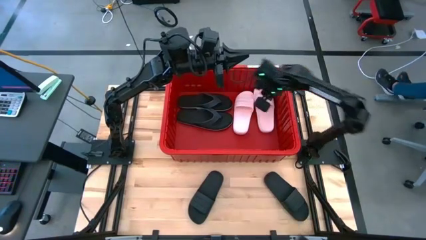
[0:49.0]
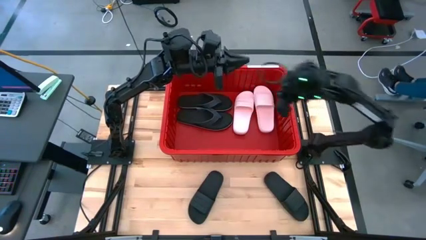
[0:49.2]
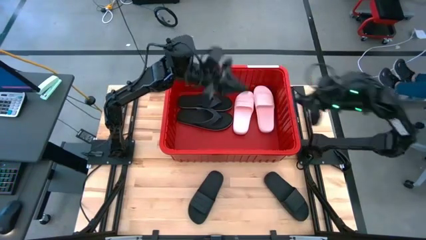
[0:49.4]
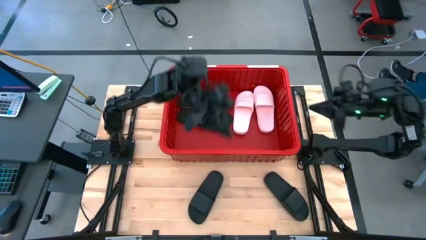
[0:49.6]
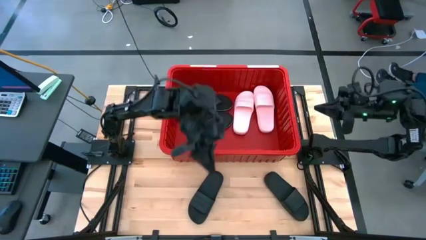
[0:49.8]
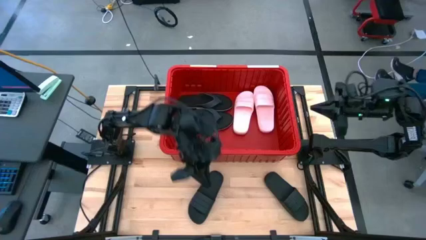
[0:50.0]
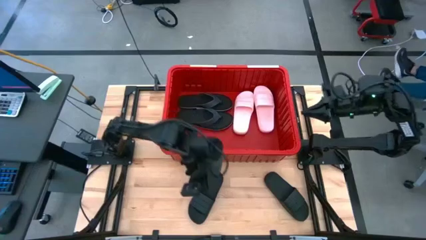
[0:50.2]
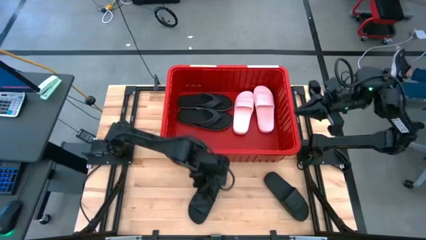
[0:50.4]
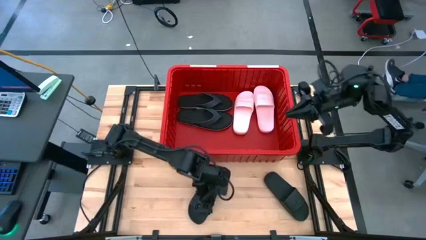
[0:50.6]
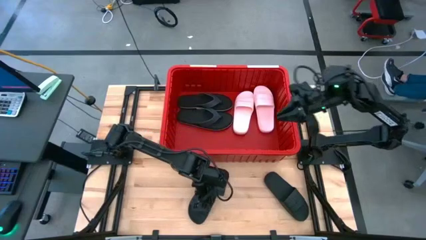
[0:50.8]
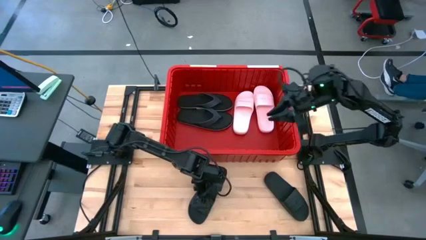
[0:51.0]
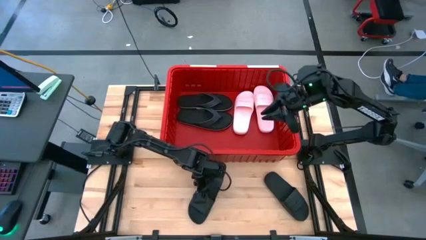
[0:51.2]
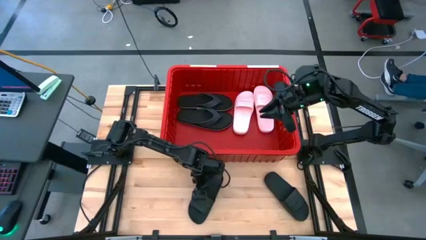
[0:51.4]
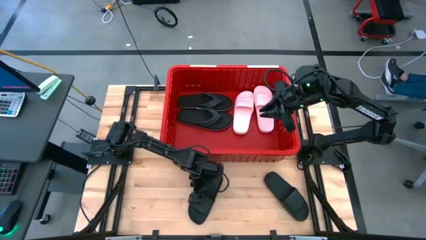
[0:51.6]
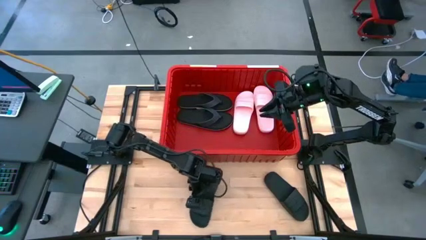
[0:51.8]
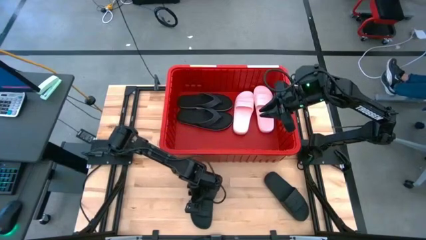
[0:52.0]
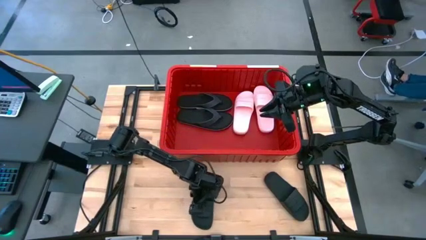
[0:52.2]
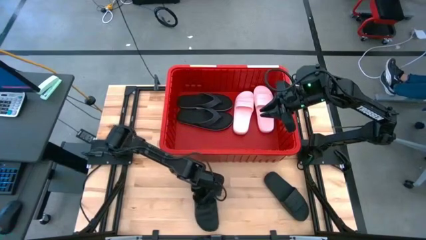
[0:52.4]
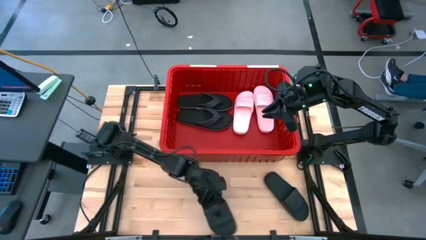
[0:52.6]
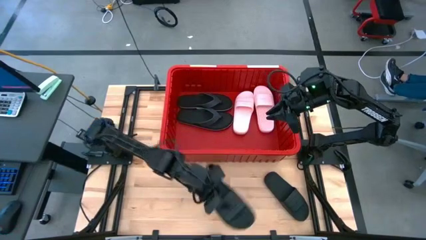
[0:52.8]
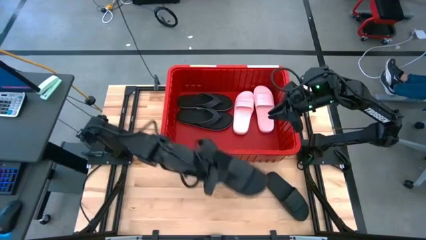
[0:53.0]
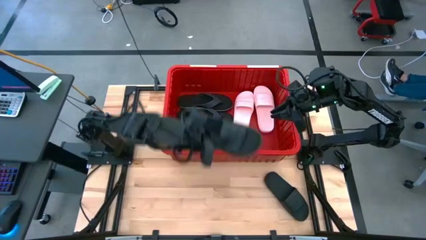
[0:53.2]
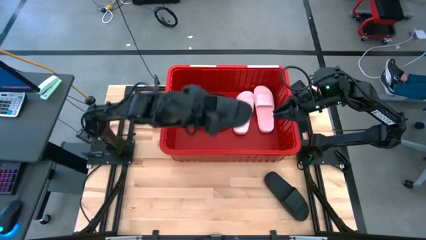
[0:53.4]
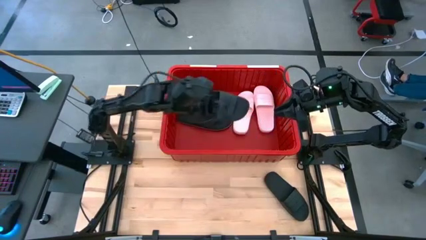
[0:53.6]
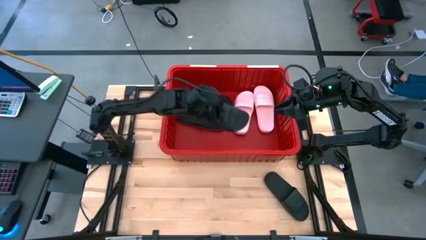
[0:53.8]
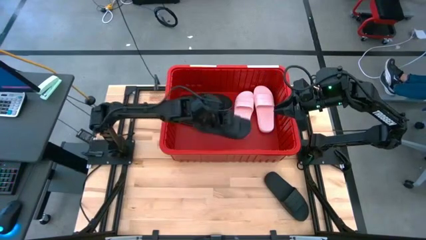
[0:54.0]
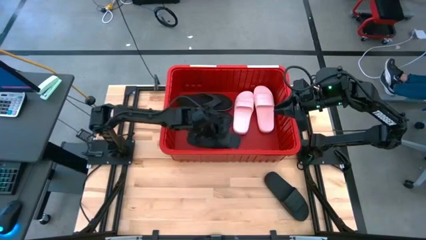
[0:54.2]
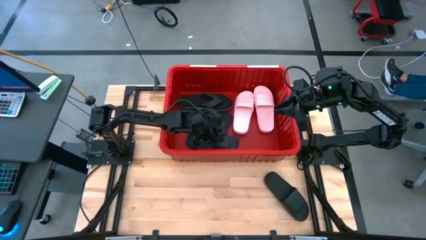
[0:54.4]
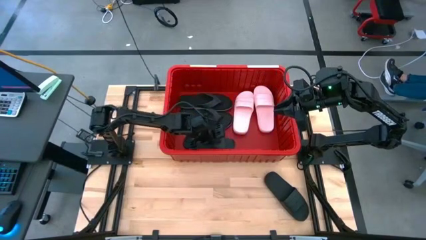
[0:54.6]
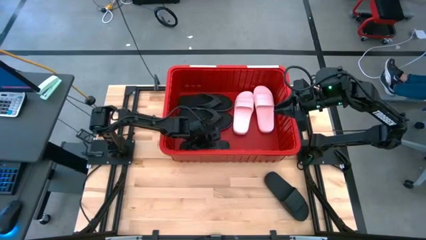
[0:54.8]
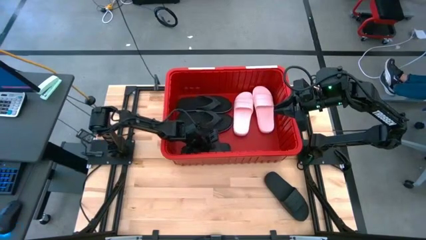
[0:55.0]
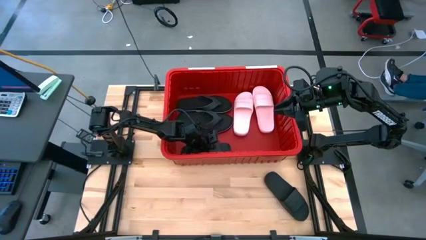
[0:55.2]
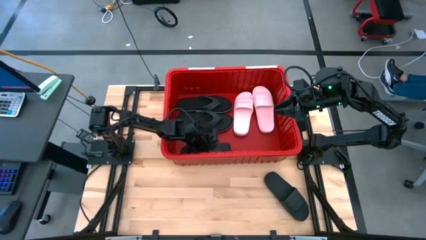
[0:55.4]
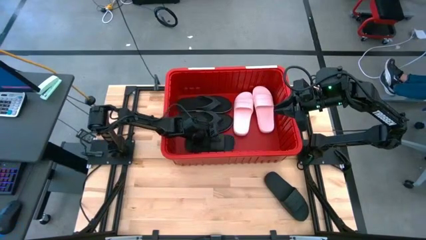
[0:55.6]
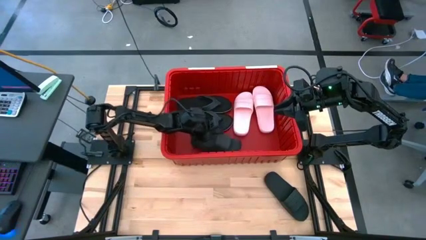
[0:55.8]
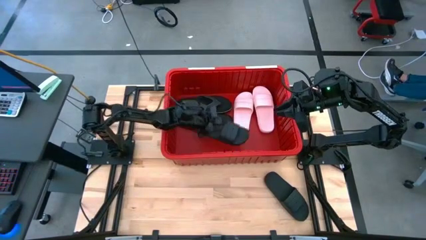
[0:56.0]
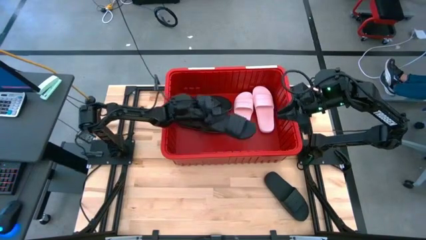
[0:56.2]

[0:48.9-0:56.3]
Task: Pick and place slides into bin
Put the black slides into the red bin

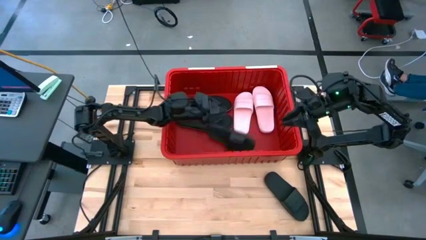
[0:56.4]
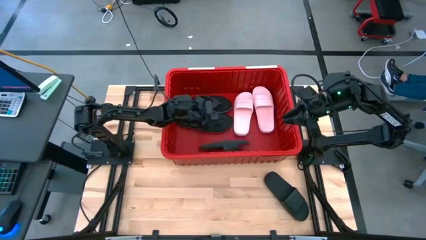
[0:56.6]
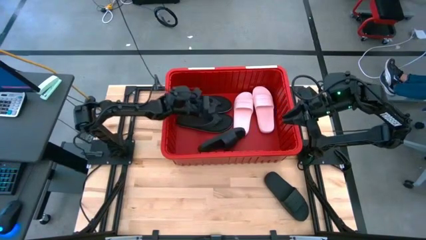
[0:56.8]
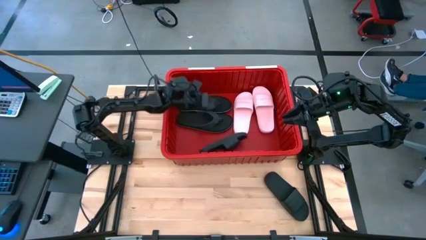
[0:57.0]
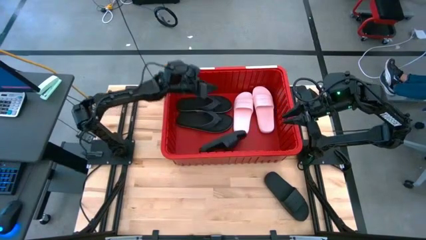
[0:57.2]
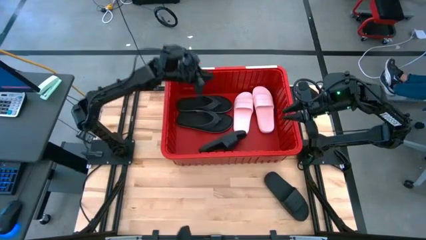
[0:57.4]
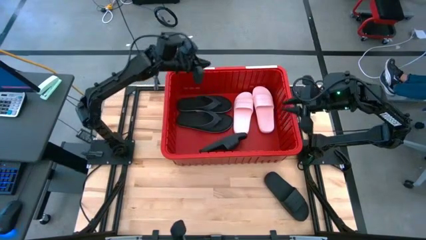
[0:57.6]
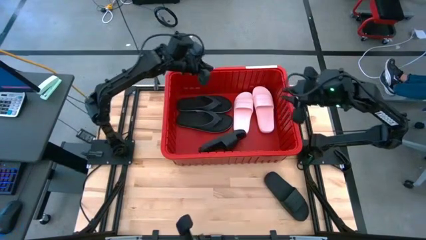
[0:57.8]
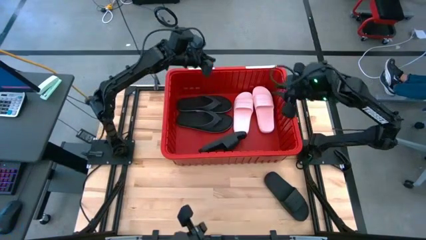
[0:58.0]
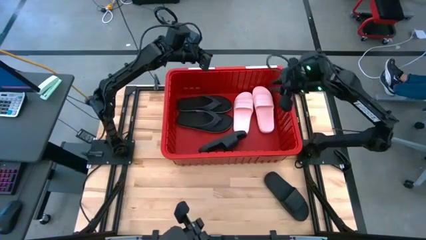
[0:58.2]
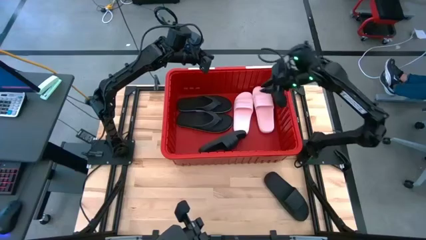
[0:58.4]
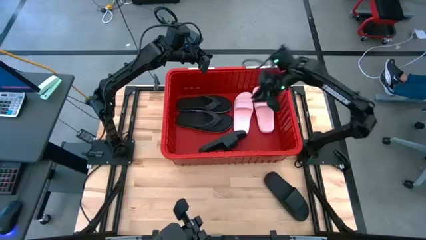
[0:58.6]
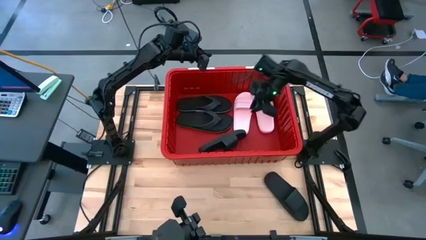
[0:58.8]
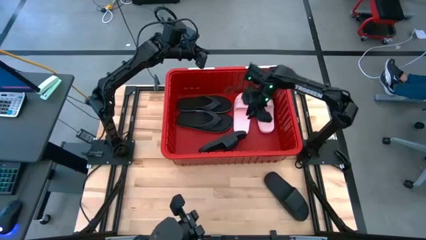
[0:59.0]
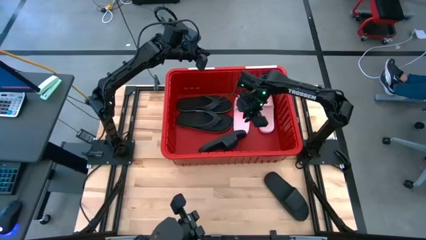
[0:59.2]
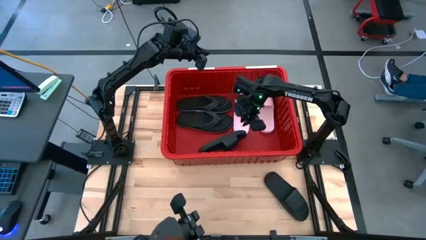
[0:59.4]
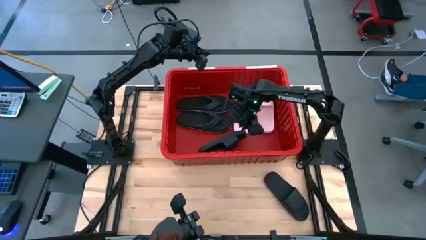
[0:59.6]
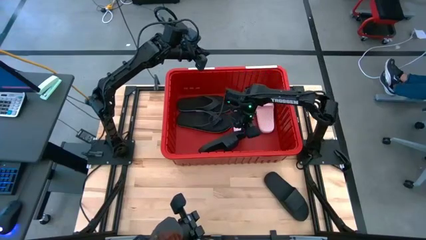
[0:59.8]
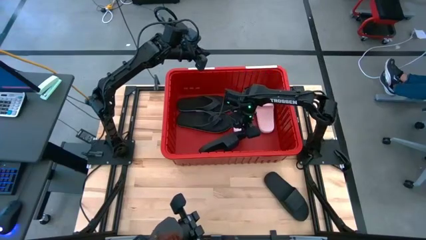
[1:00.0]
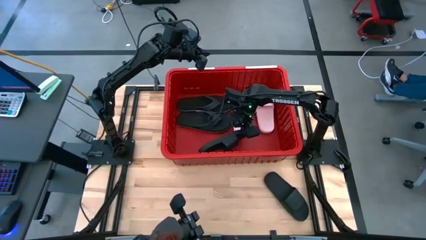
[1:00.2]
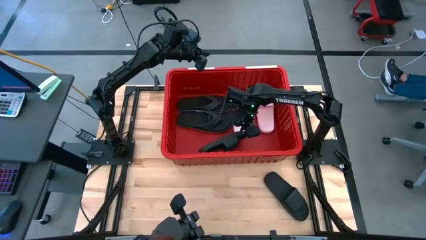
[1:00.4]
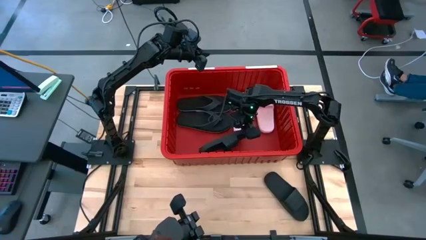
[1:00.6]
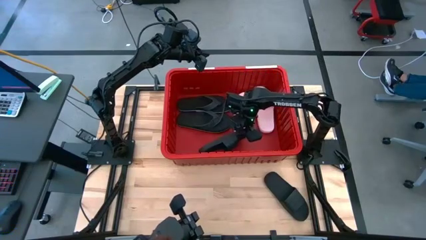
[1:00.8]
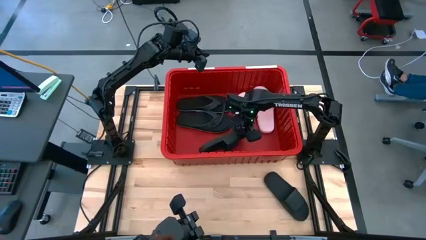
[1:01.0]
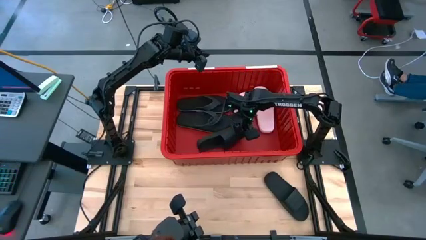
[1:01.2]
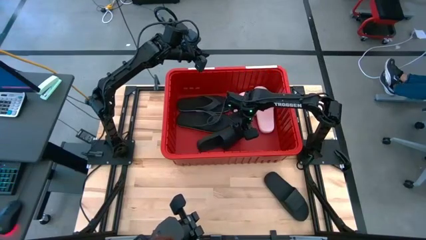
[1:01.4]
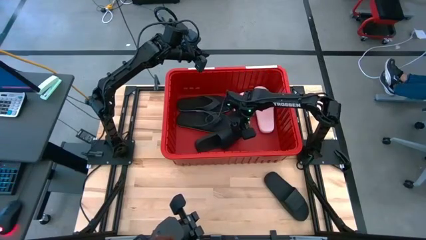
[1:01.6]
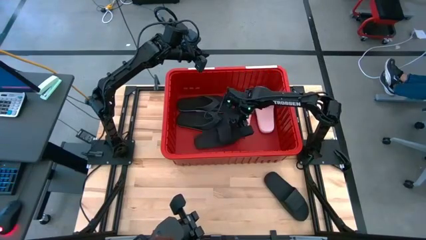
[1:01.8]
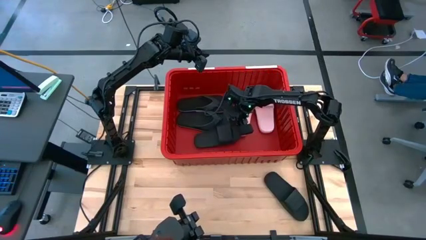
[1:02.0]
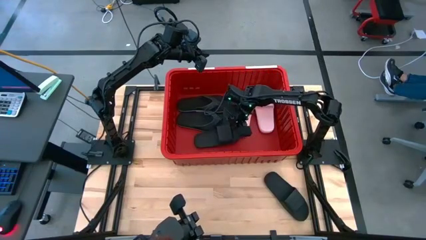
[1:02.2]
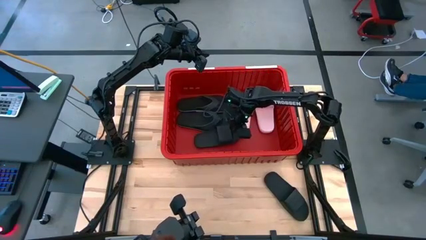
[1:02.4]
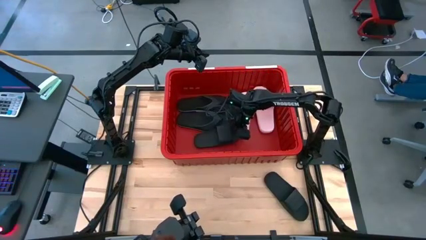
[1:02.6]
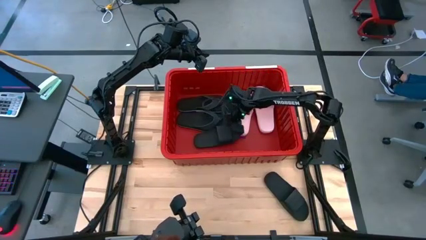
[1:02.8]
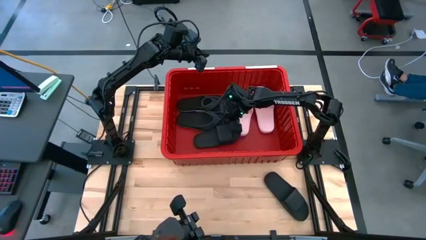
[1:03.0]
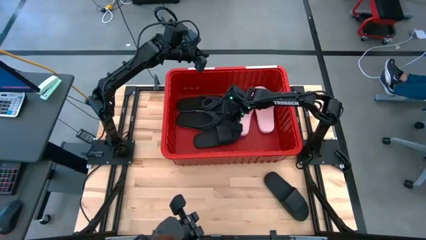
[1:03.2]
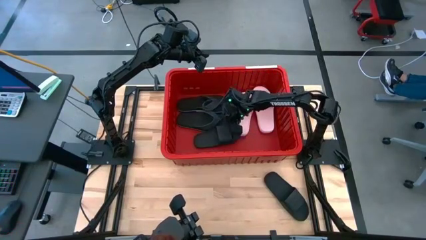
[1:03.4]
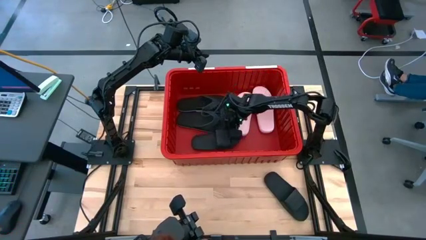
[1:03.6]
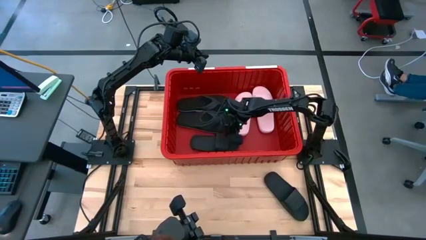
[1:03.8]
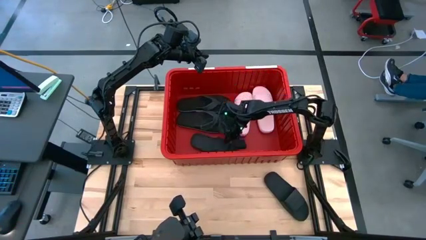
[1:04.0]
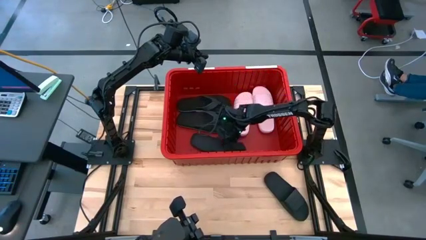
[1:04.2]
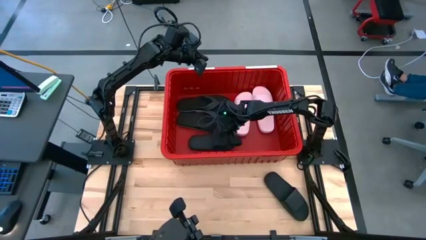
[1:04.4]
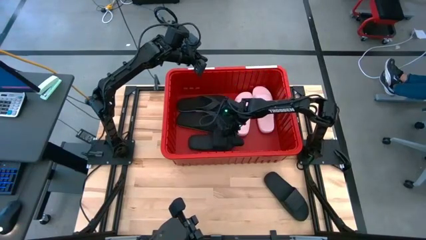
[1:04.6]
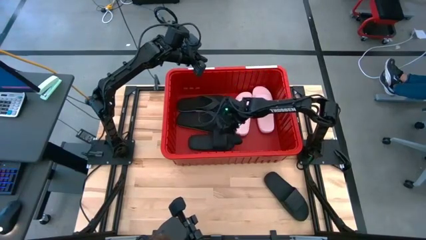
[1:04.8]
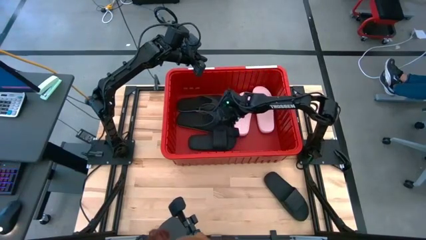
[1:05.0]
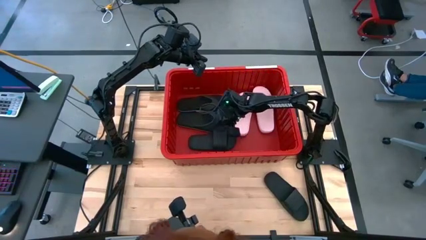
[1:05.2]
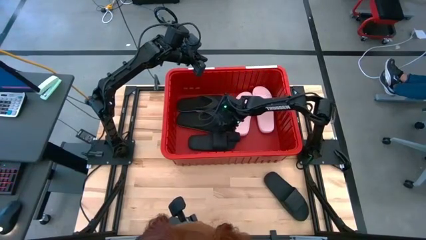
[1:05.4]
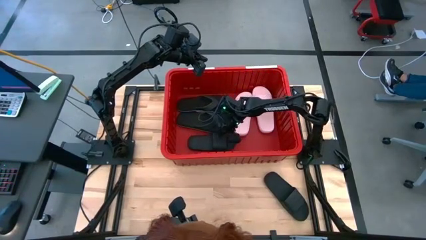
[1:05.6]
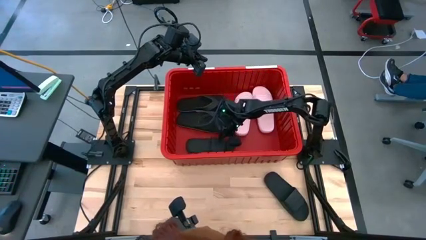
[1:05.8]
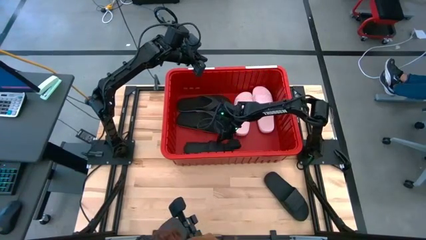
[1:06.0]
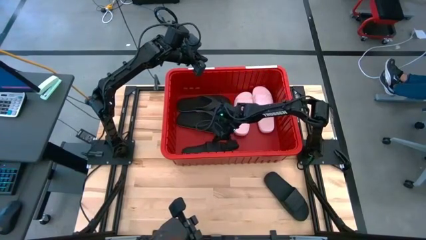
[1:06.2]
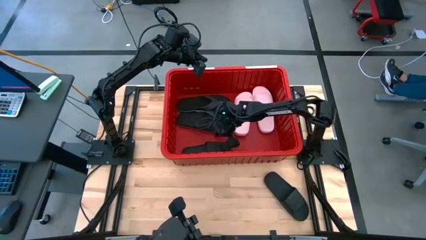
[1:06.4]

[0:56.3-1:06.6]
Put the black slides into the red bin
